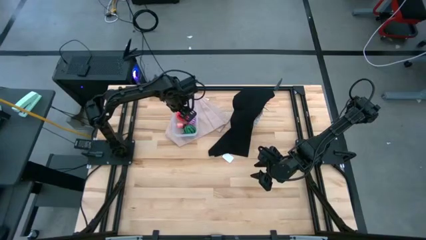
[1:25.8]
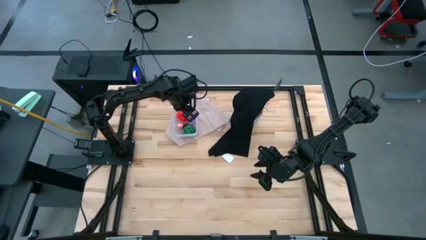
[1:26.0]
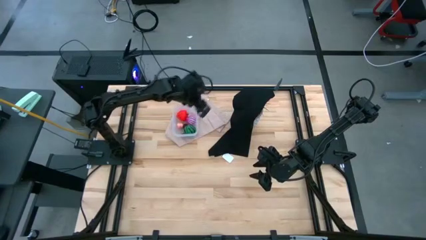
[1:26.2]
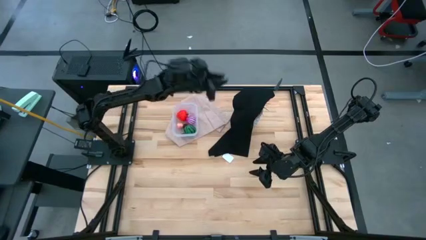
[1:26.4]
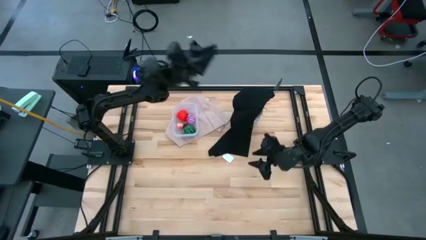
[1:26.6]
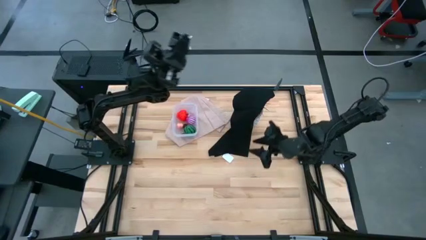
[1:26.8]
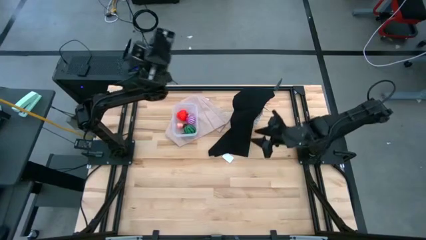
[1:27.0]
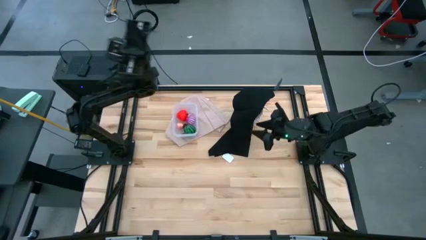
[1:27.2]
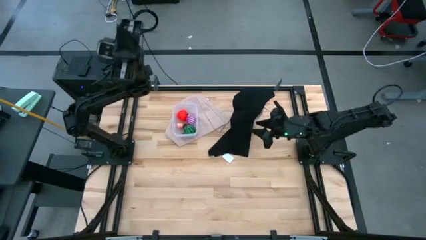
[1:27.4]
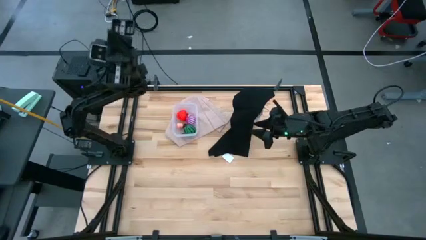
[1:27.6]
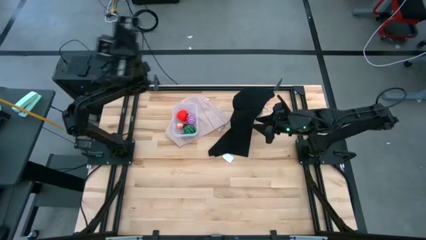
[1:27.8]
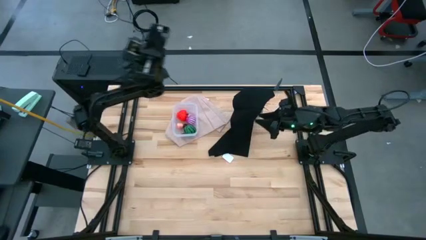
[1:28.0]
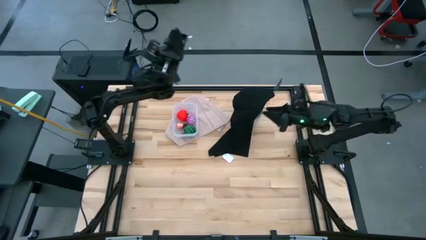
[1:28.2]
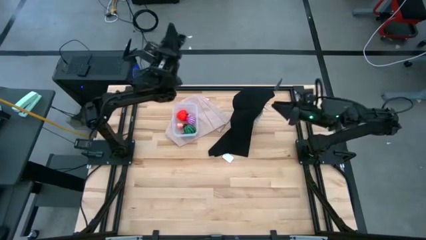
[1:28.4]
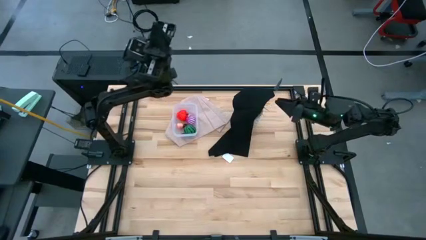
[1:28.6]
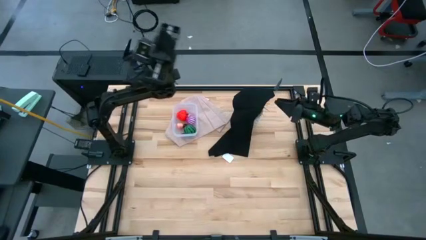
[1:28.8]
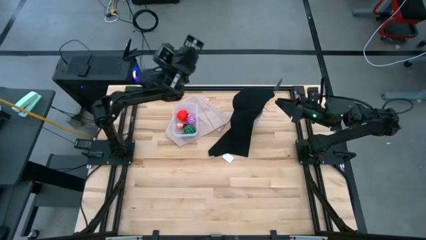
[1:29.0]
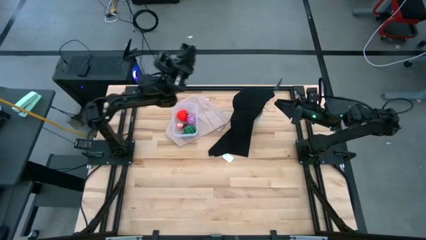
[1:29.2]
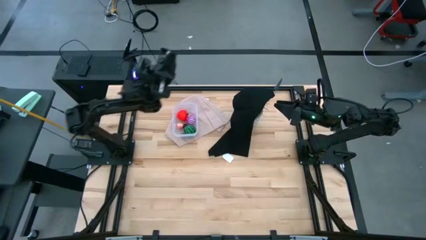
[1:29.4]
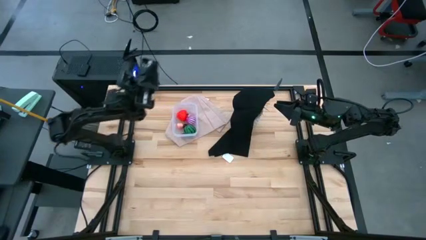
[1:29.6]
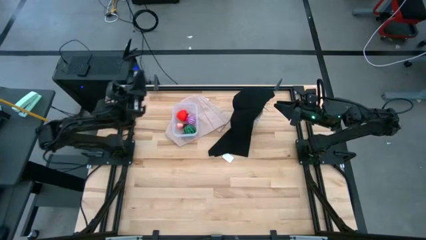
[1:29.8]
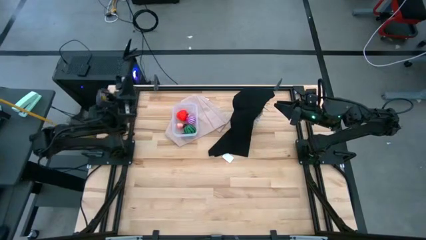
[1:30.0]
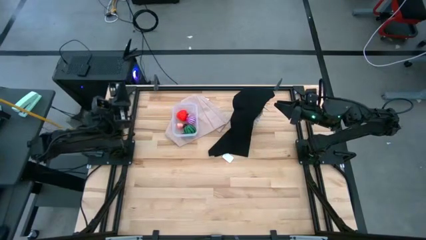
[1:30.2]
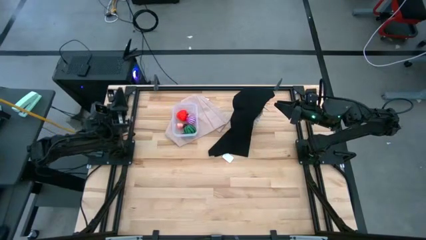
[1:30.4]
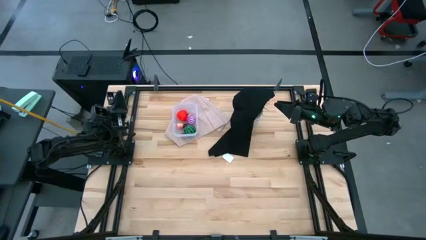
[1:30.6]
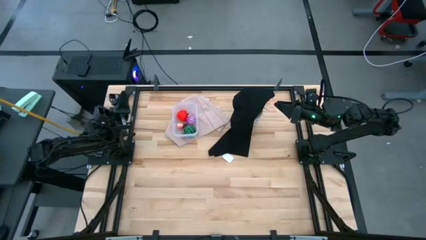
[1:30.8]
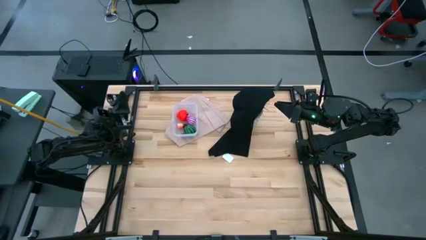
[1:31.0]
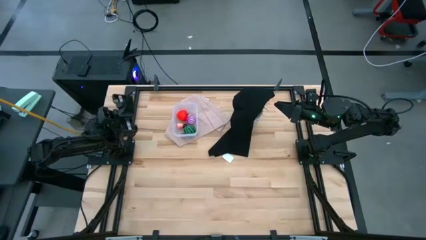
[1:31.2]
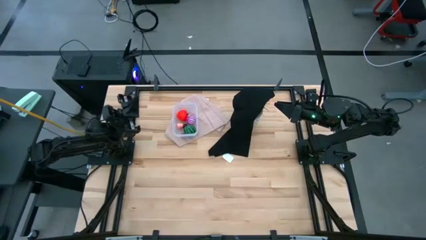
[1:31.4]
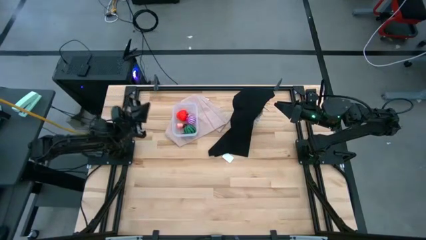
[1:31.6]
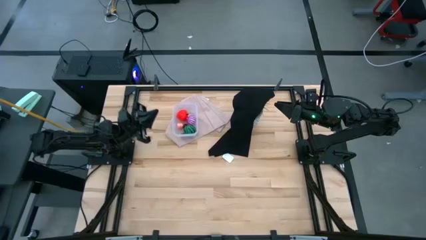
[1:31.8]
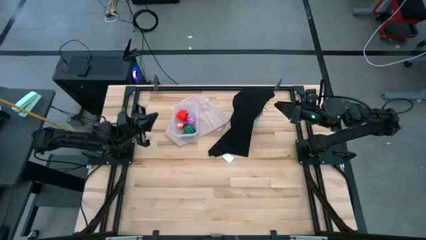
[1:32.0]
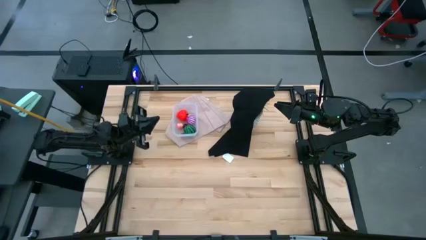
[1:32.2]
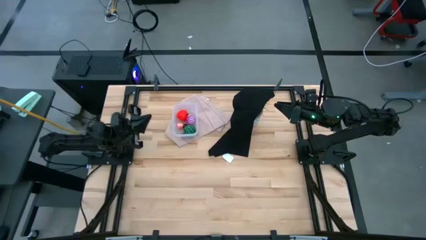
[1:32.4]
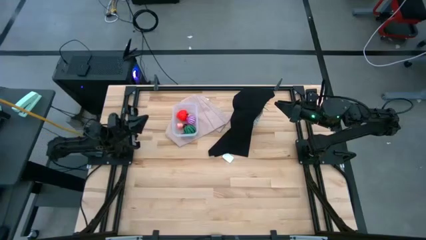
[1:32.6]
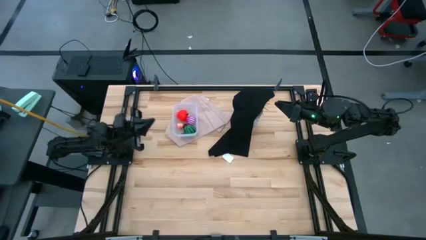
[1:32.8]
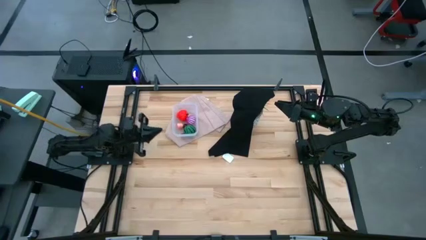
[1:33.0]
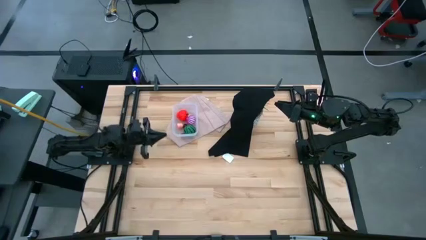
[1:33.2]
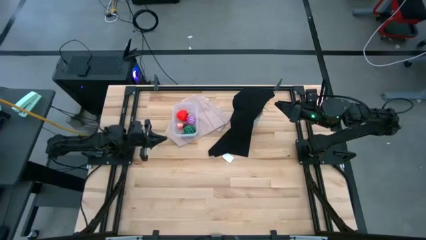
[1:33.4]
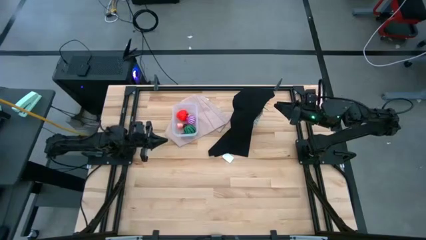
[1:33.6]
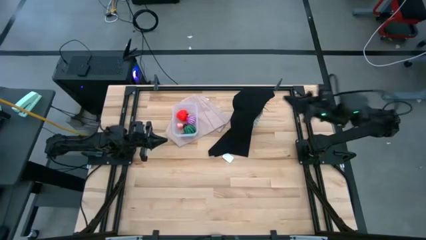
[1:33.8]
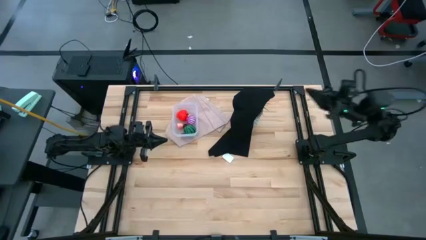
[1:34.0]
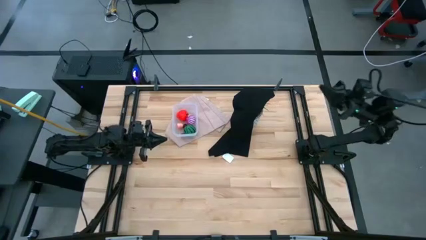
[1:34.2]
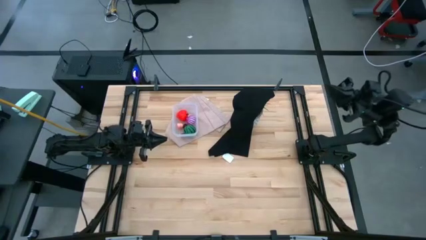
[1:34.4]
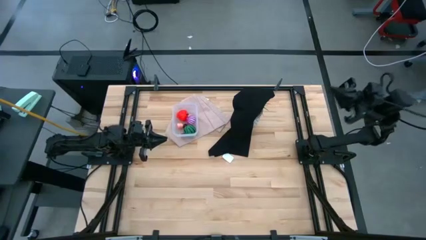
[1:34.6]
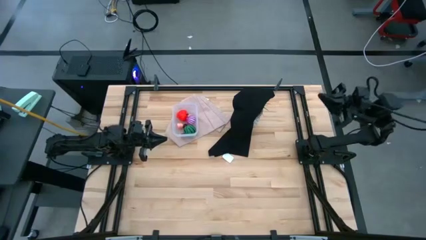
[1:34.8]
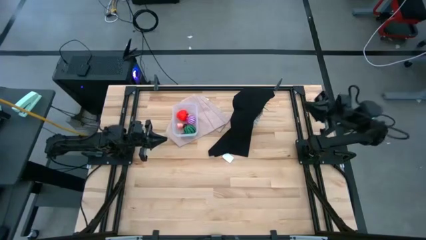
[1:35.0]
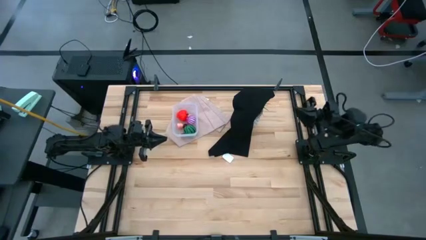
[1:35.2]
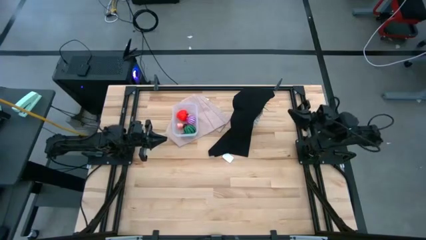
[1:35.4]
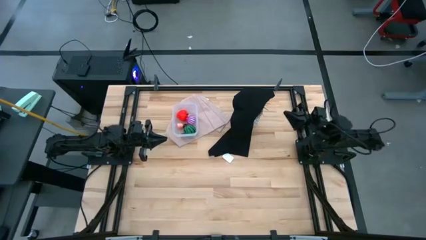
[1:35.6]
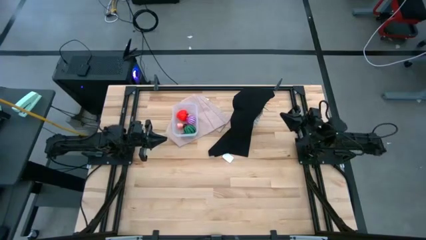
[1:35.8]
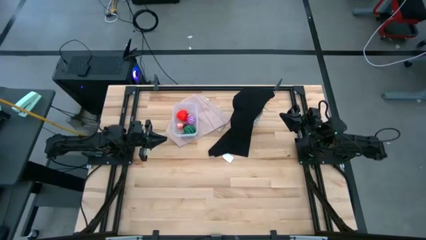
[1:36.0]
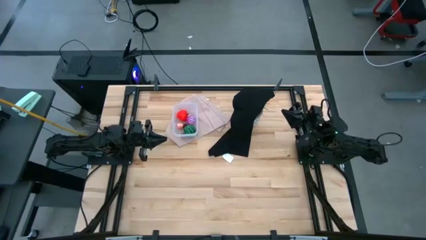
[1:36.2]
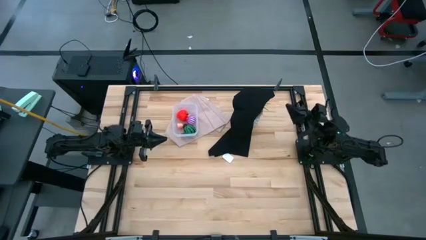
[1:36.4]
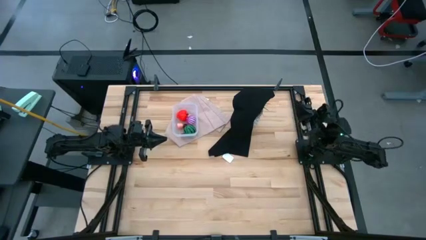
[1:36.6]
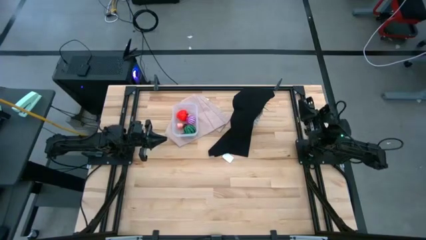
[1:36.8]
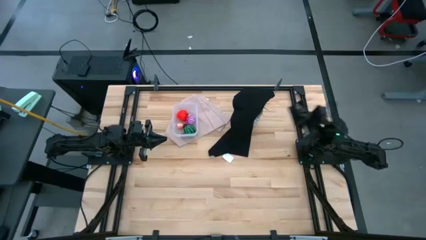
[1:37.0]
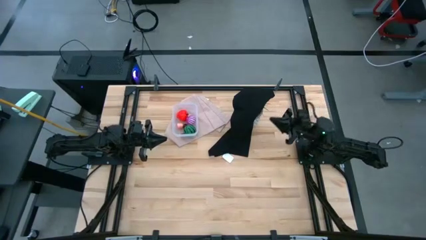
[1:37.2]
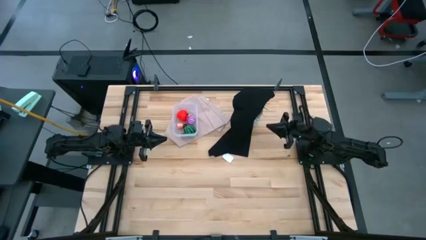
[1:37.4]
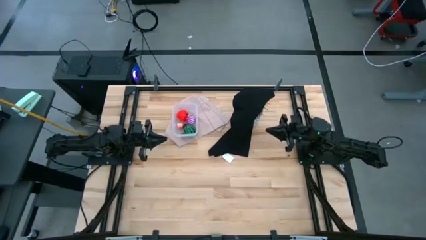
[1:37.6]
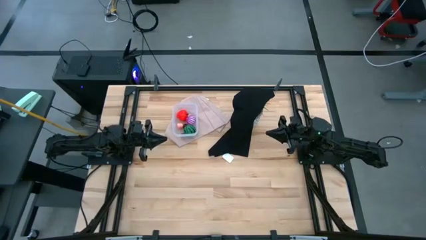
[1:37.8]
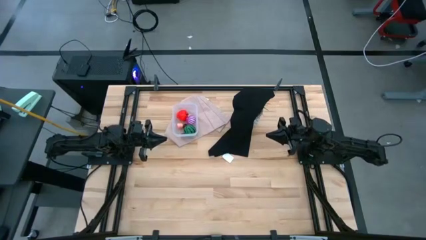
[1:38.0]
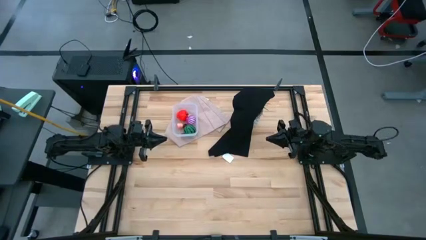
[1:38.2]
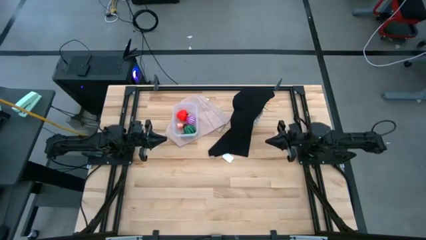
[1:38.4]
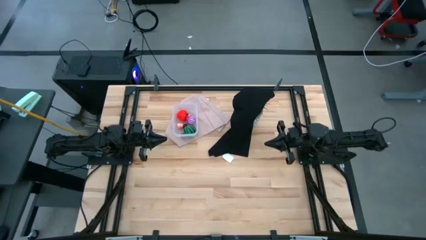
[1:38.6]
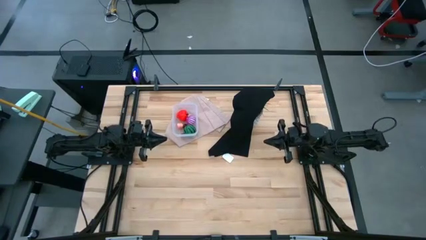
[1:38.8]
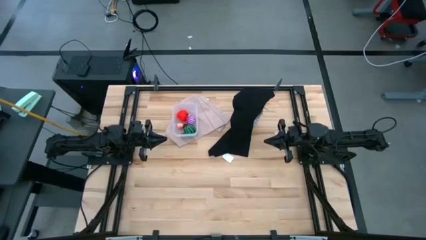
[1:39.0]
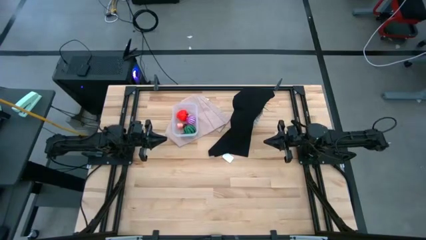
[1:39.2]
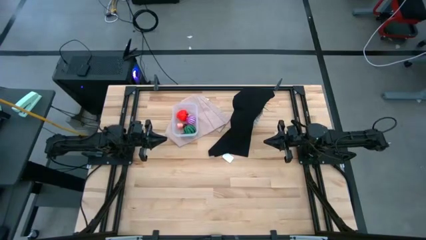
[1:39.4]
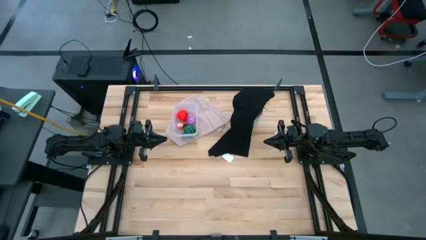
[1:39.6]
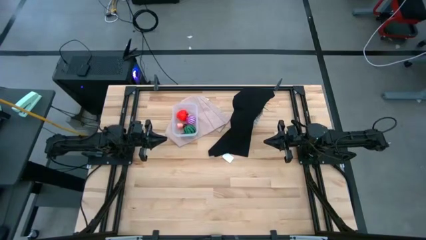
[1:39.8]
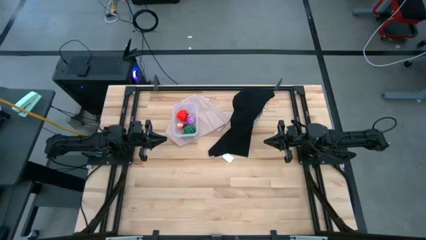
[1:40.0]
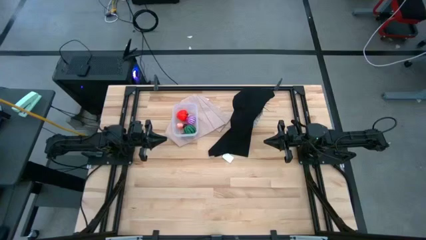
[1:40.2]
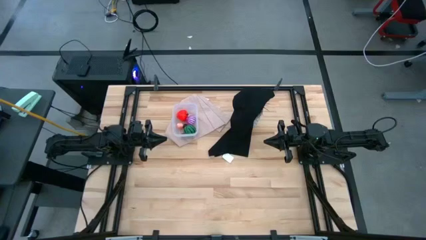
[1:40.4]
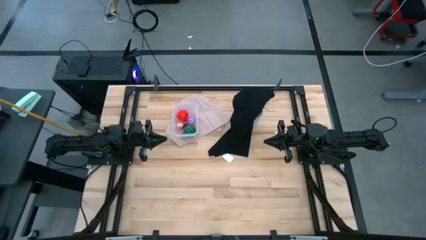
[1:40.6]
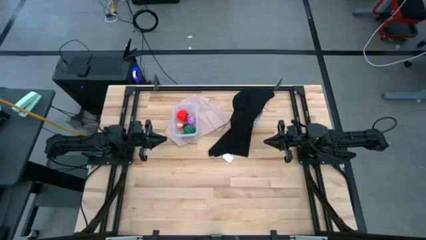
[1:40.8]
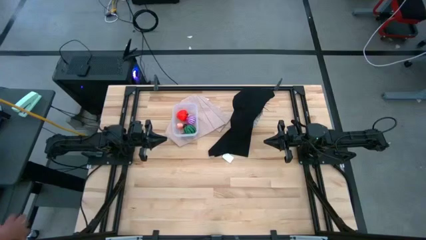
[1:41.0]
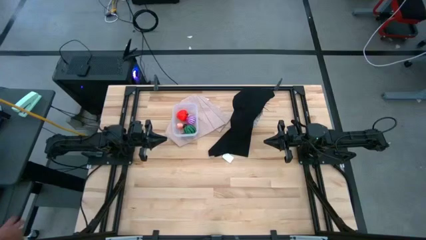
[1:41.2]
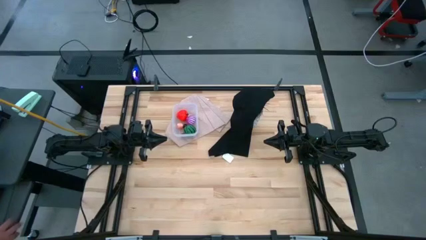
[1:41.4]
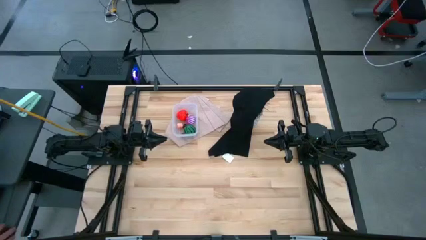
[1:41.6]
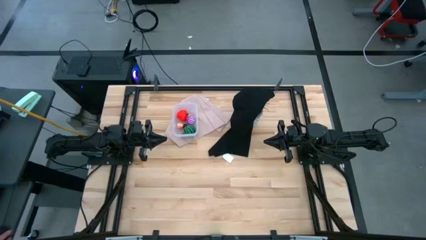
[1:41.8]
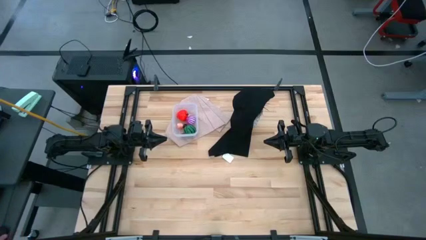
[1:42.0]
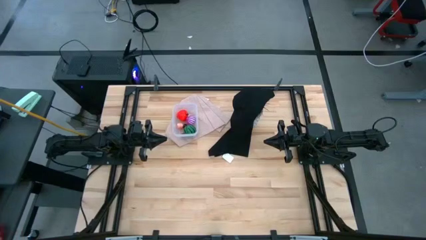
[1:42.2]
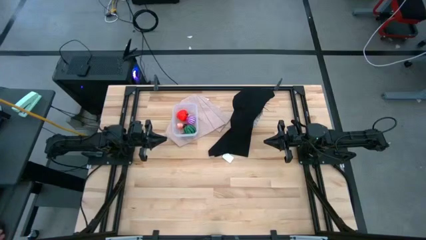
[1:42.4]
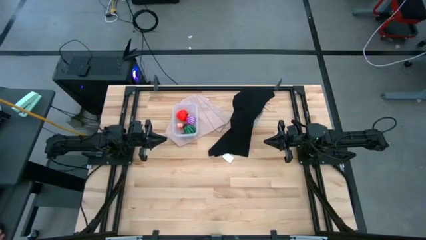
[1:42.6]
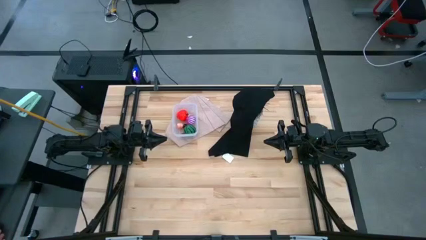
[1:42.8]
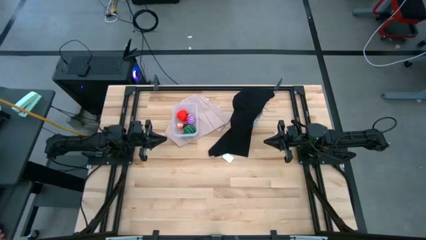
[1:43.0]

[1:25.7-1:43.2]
Task: Pick and placing Produce into tupperware
Return to Home Position
